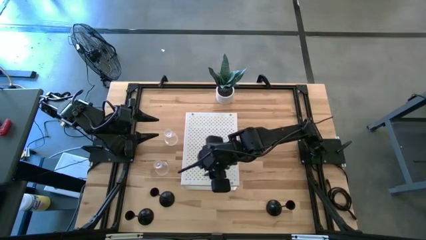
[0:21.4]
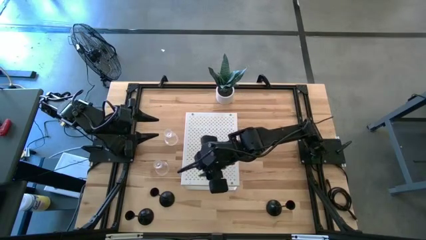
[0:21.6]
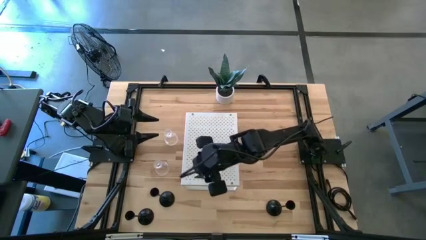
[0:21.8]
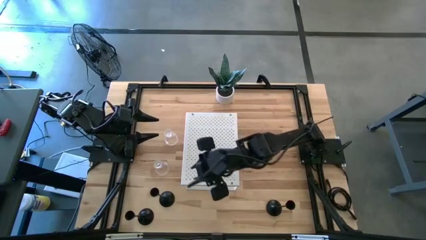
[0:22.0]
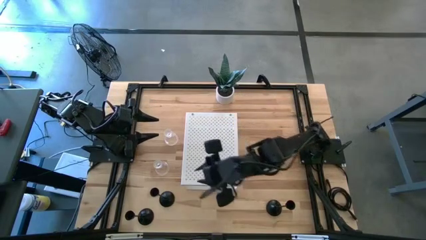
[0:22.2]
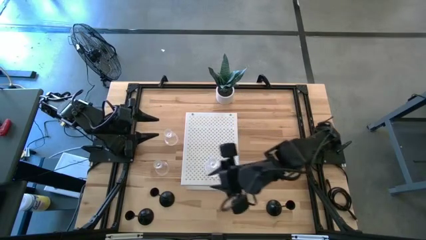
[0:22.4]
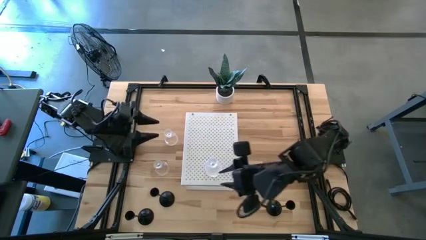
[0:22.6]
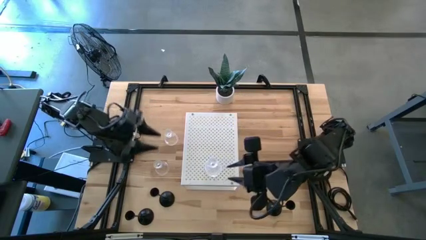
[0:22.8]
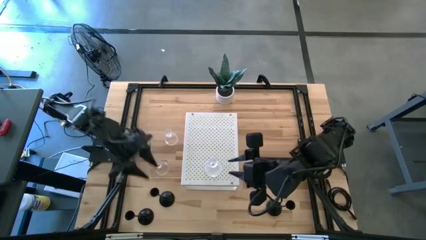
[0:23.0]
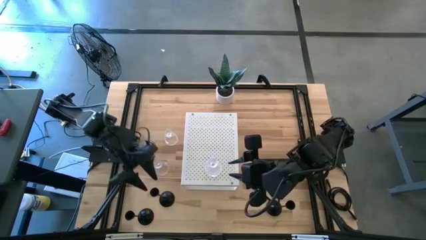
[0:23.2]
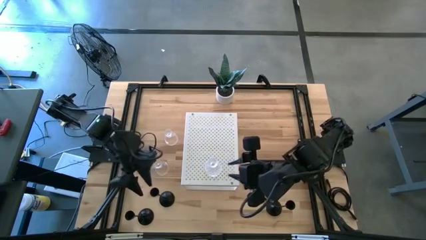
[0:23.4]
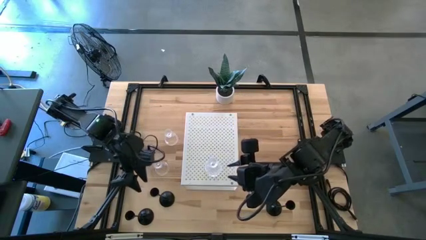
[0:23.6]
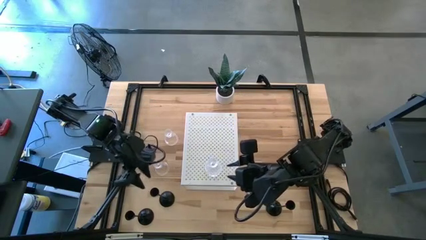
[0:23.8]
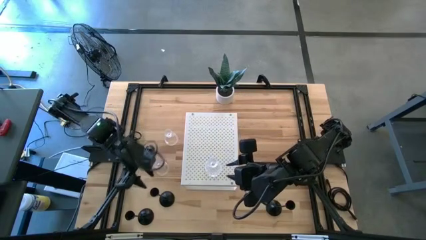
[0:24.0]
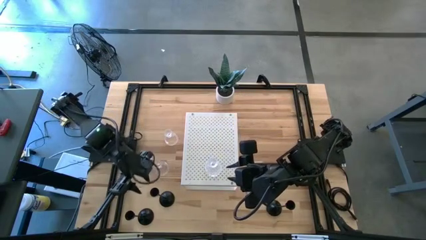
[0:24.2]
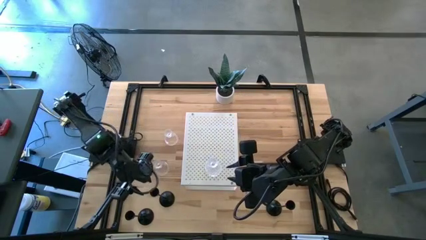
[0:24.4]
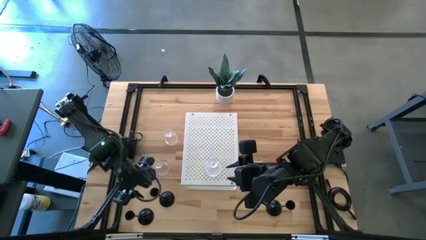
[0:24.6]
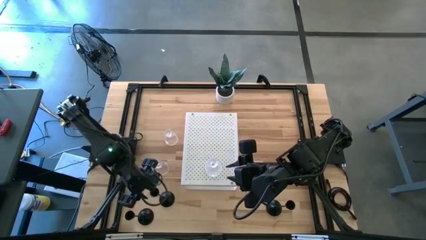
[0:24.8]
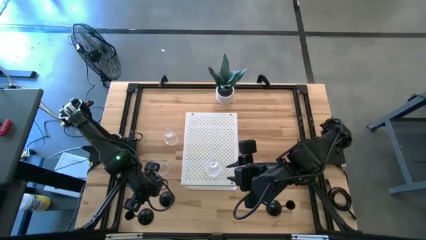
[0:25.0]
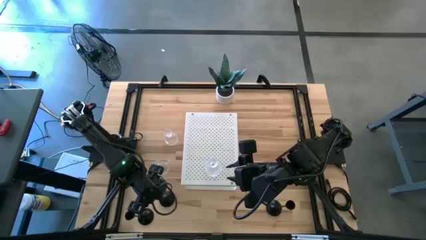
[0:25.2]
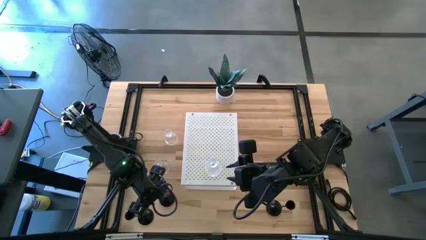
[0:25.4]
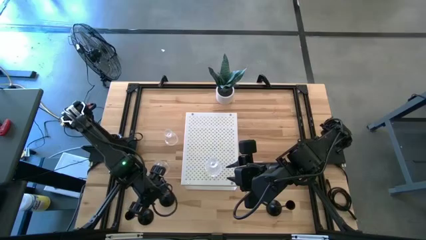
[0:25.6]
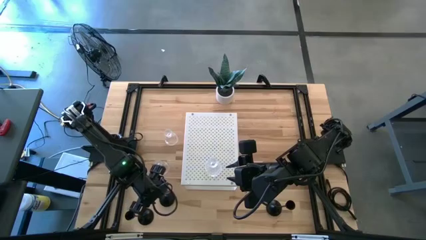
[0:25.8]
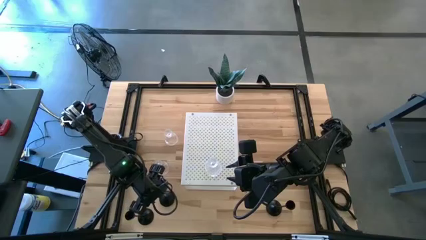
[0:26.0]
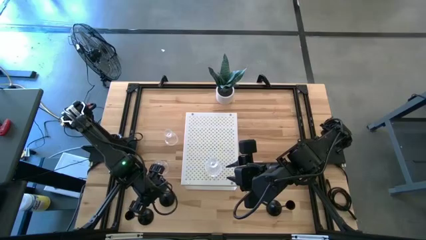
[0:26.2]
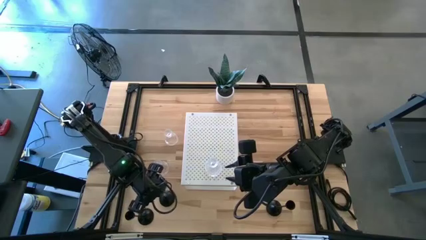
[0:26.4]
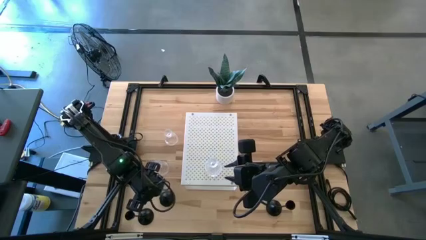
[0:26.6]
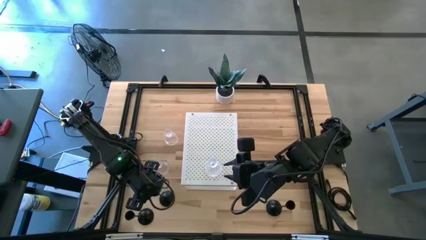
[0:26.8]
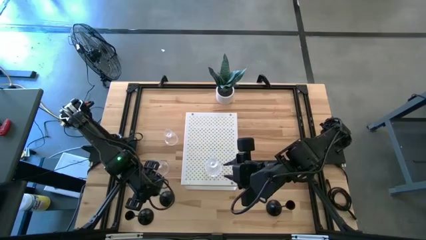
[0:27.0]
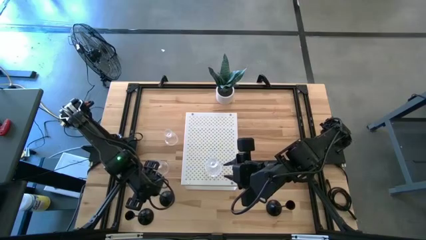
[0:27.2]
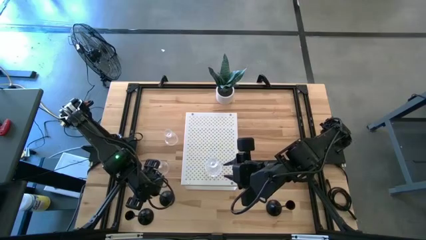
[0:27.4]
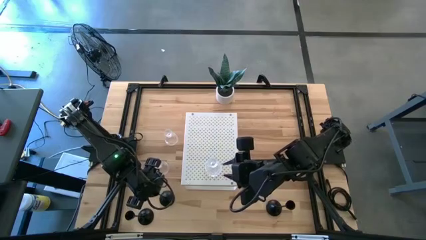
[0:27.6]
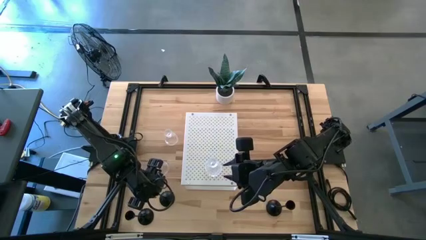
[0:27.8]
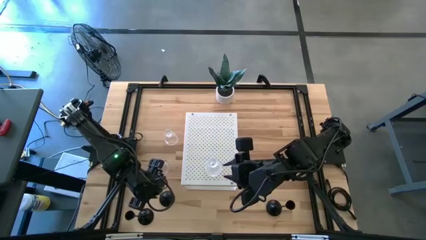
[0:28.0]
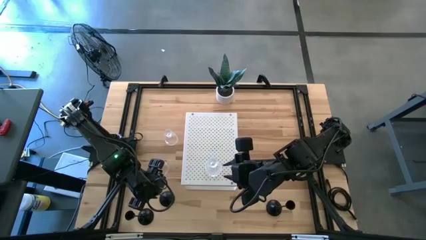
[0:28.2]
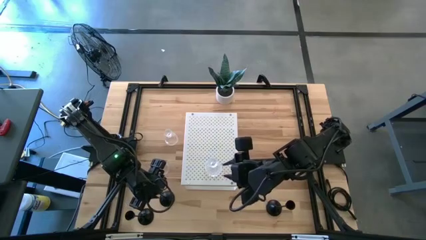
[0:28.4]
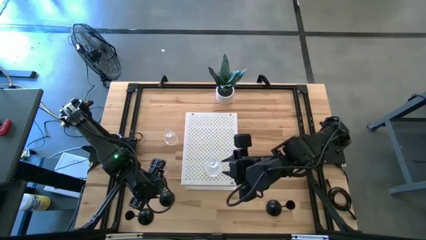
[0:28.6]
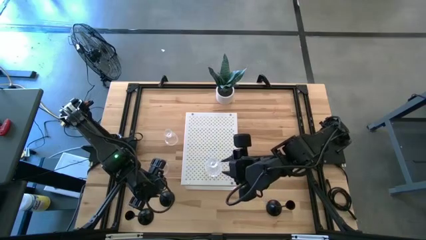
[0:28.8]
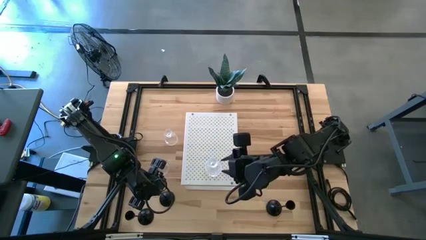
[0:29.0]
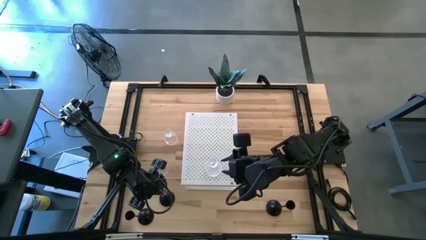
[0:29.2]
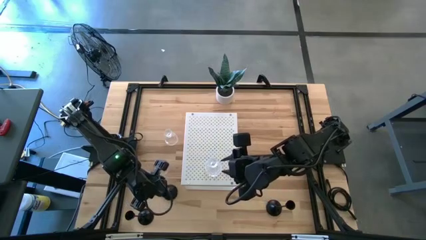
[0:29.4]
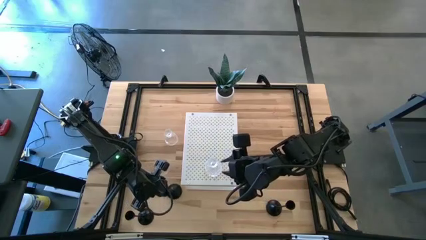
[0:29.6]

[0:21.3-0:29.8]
Task: Pick & Place candle stick holders
Put the top black candle holder on the shelf

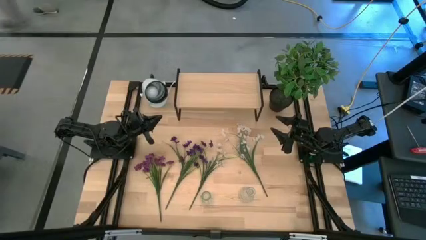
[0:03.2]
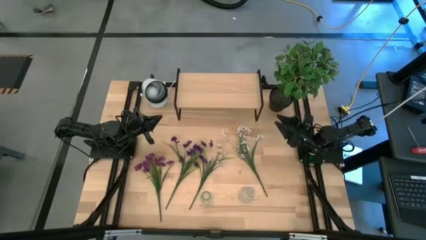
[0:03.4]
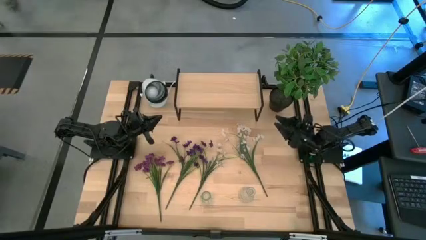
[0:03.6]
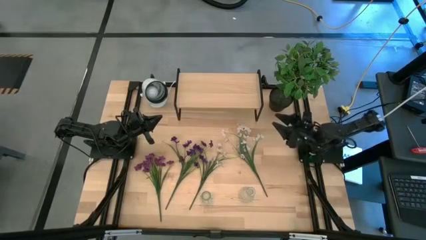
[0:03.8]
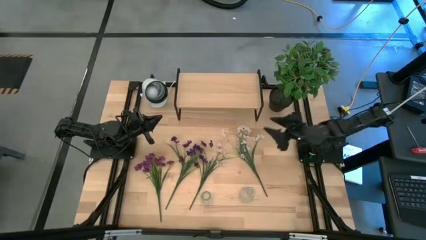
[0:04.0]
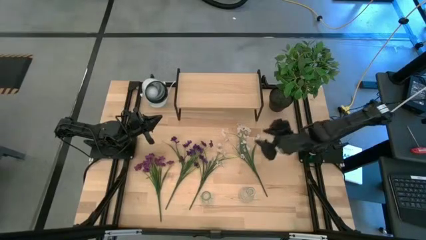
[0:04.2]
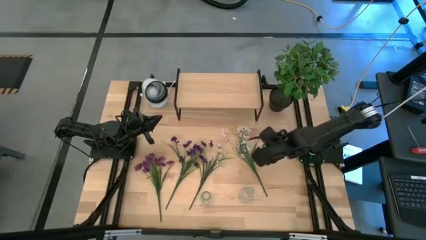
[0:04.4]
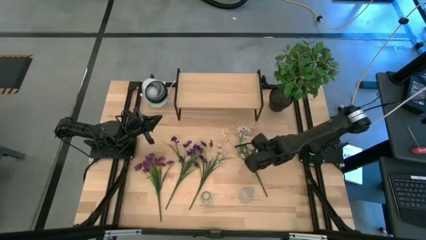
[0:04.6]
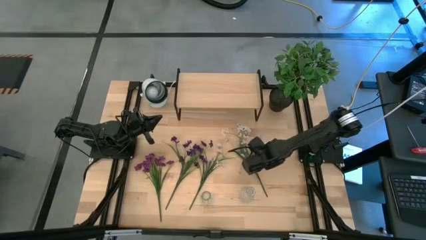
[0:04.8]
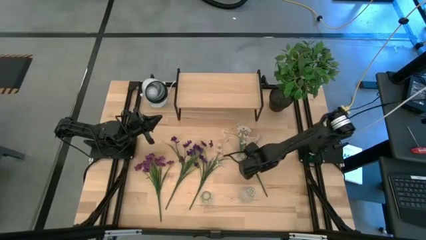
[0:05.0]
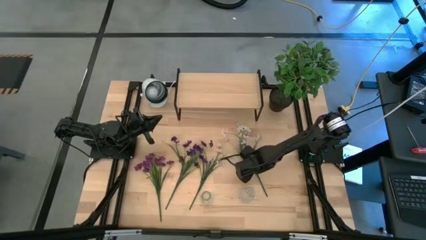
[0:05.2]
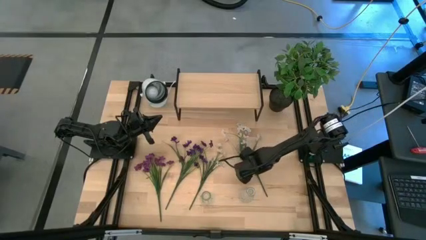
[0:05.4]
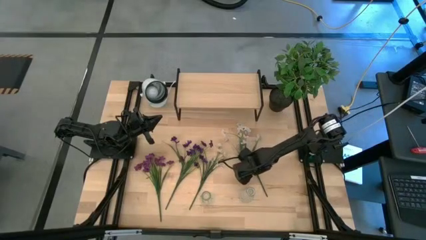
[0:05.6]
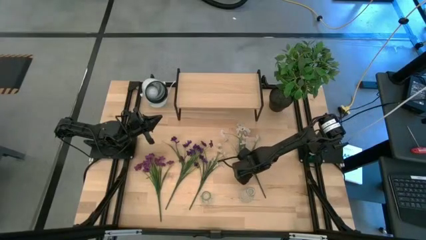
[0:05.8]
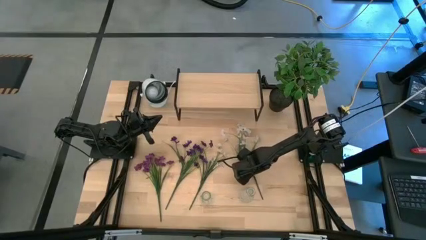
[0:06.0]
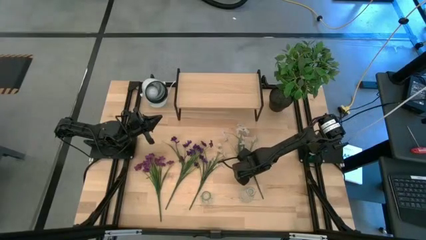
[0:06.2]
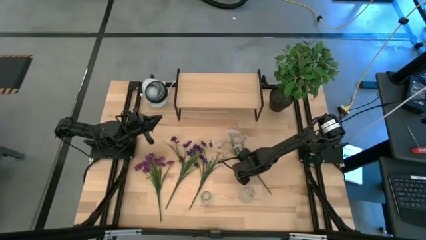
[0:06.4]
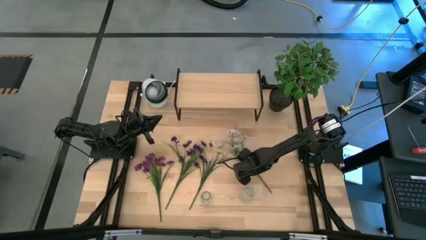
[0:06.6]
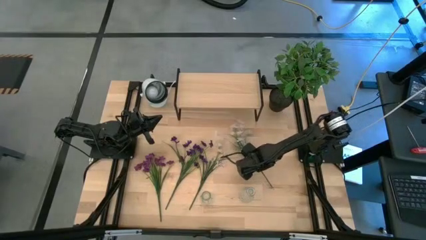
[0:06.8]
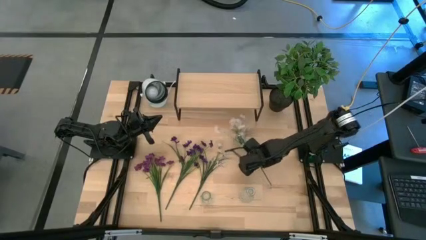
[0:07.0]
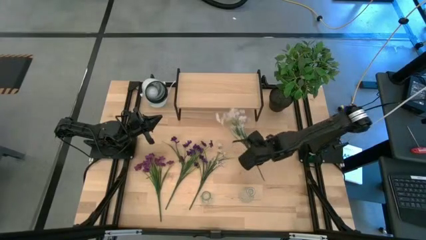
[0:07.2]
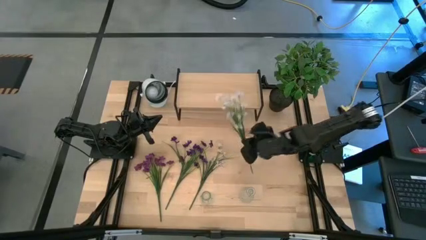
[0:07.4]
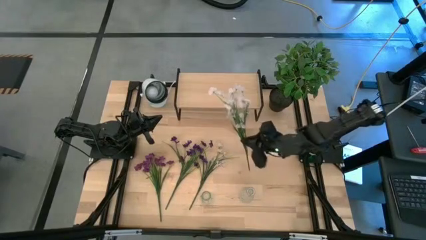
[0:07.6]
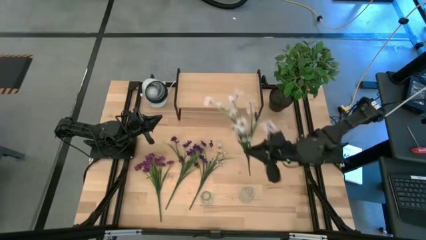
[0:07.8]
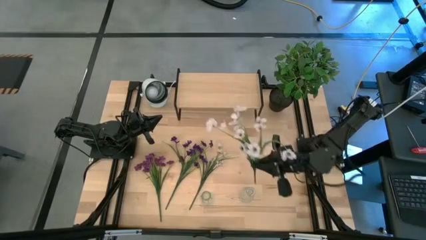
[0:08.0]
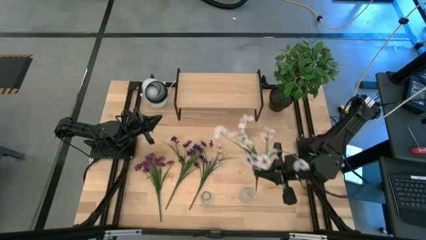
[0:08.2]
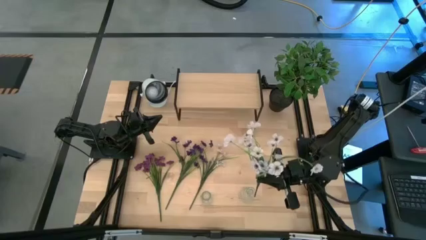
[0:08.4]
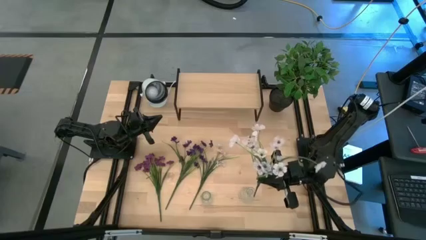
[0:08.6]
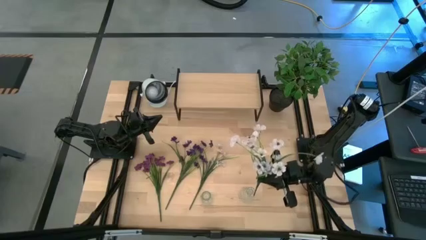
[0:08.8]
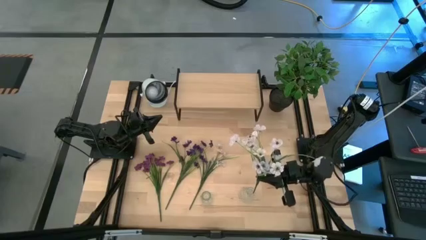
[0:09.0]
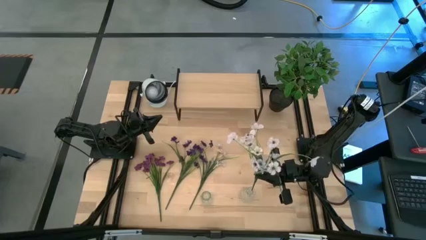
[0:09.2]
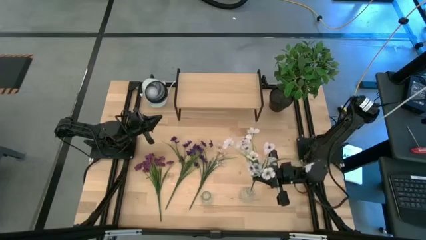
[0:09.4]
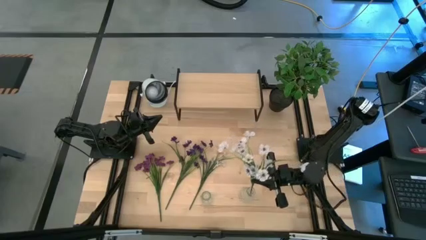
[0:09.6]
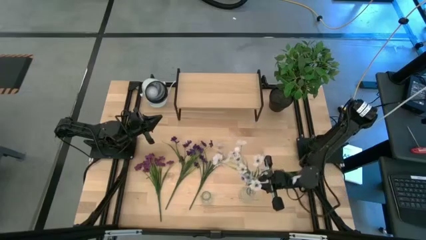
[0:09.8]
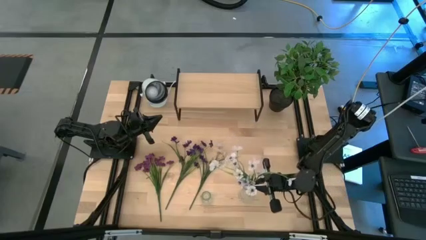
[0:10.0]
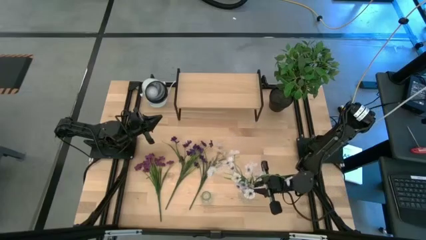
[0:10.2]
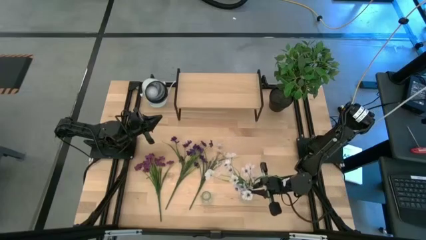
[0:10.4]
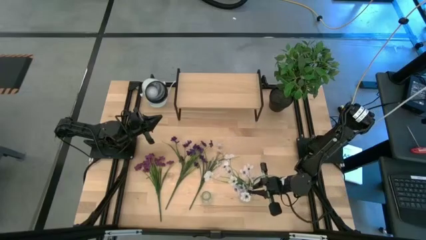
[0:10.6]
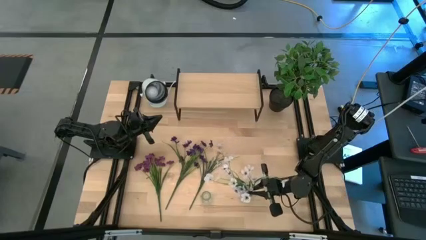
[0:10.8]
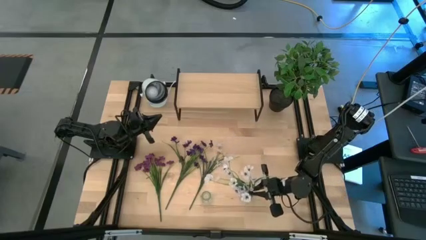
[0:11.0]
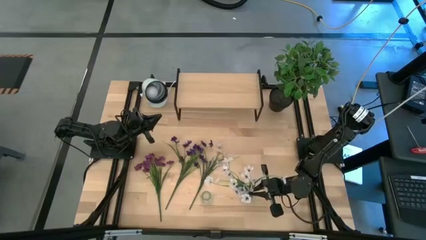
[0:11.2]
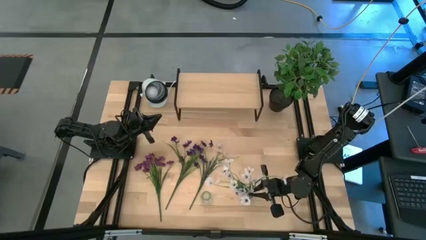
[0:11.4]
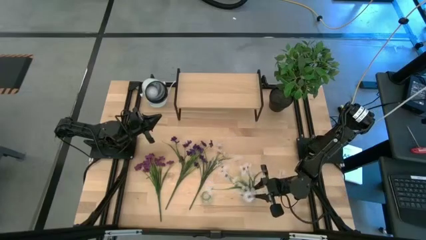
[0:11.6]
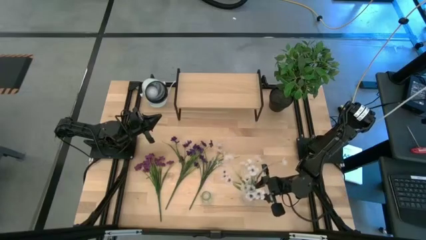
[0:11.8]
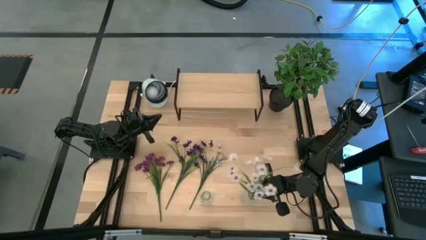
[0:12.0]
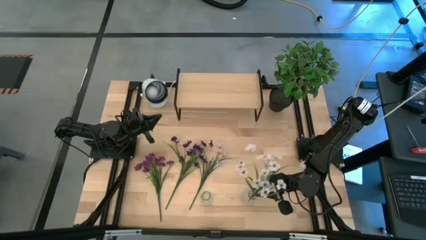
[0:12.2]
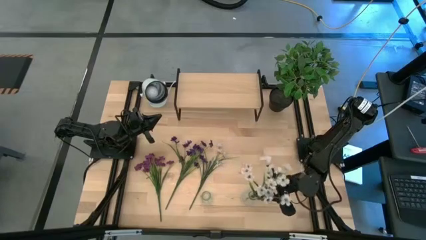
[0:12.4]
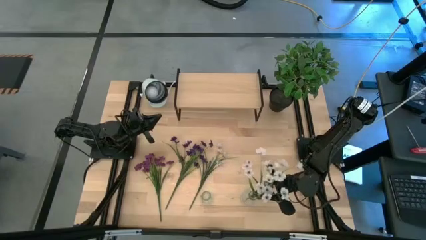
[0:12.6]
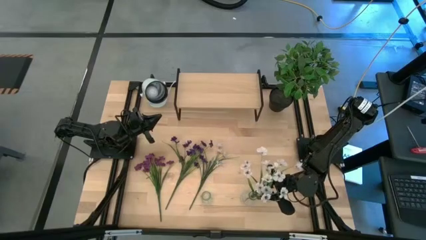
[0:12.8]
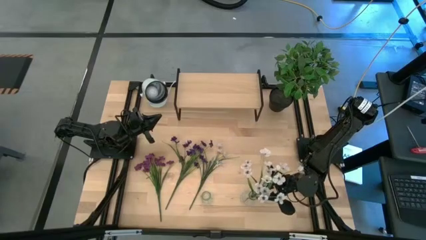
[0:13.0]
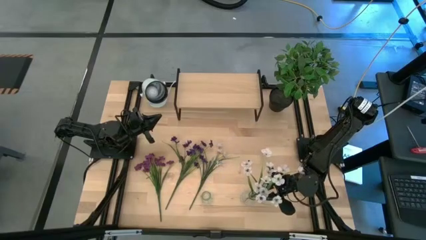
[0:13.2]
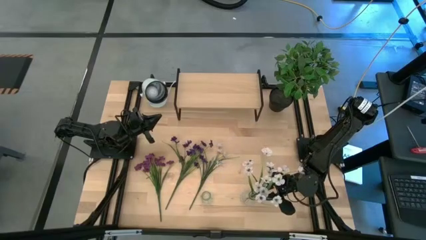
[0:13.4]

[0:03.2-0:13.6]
Task: Pick and place flowers into a vace then onto a shelf
Put the right white flowers into the right transparent vase
